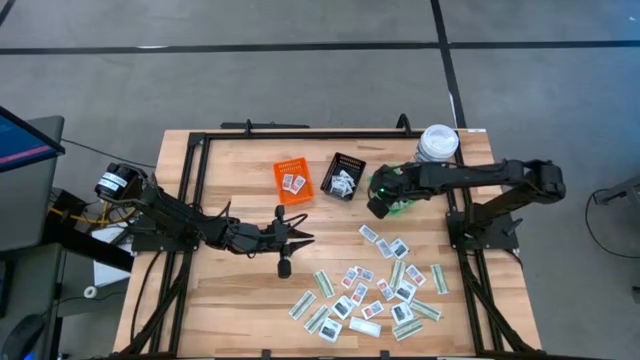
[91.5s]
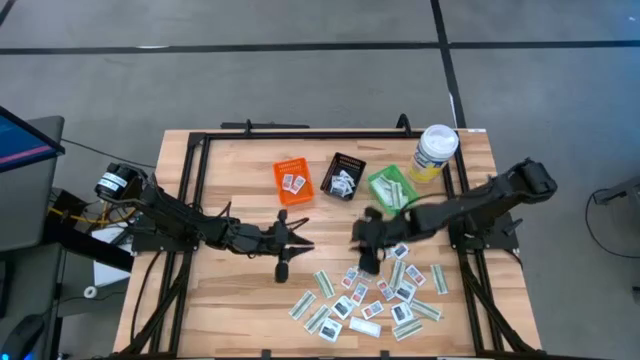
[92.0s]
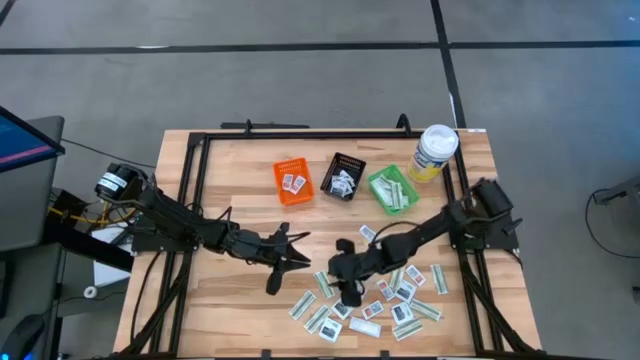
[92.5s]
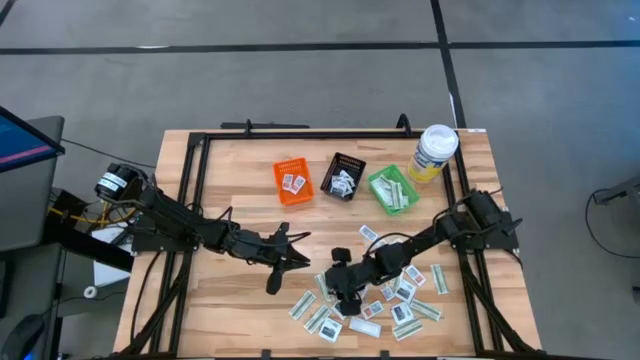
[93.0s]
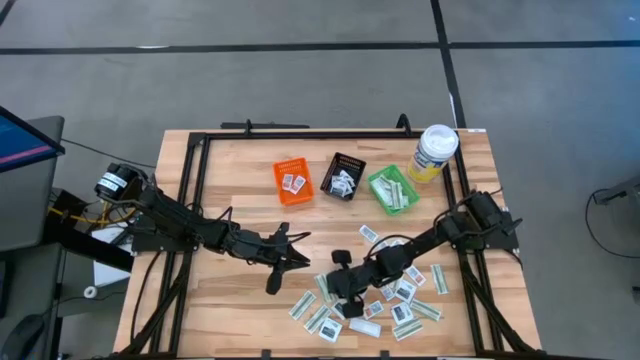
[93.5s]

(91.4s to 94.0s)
Task: Pick & Place First Aid Supplies
Put the green bandage pack into the green basket

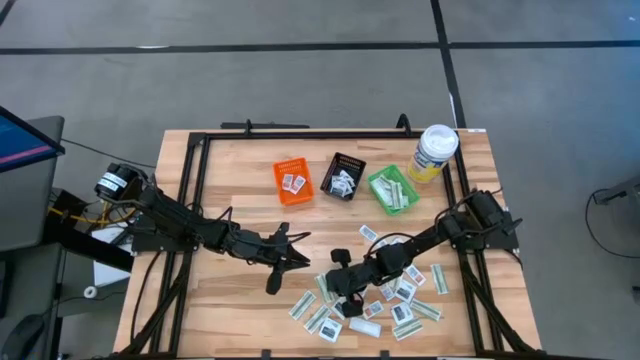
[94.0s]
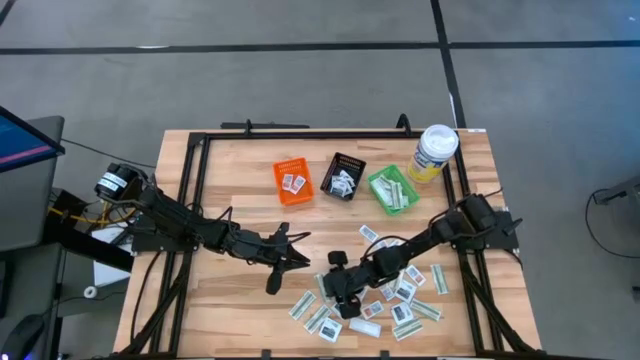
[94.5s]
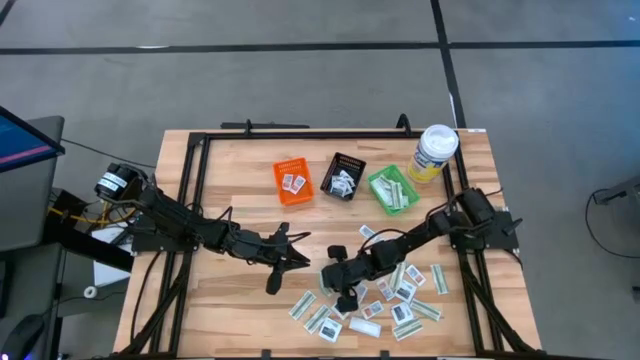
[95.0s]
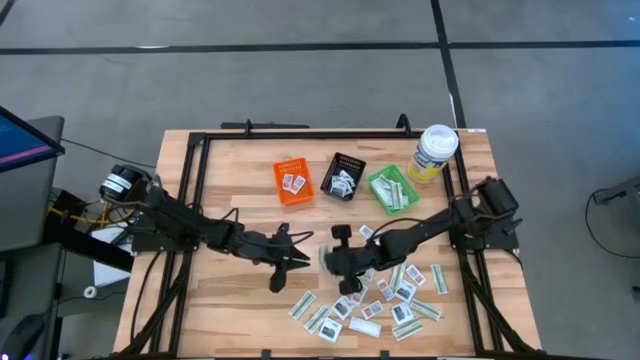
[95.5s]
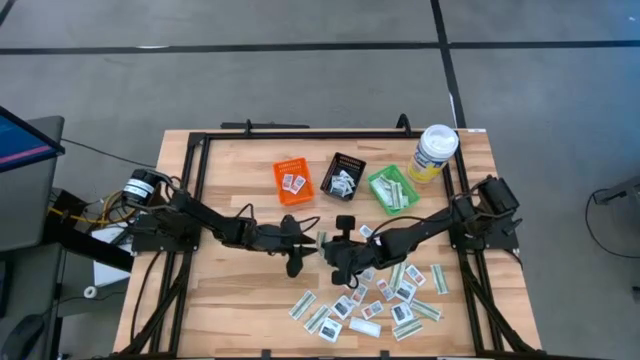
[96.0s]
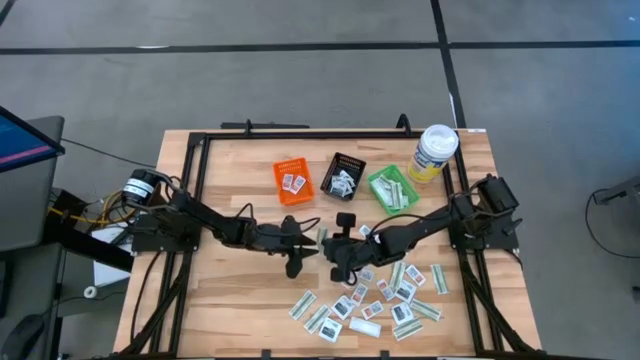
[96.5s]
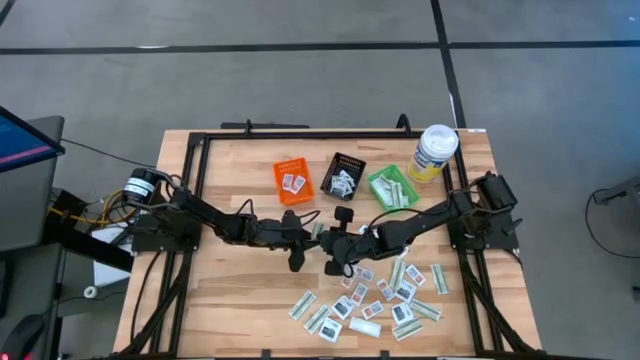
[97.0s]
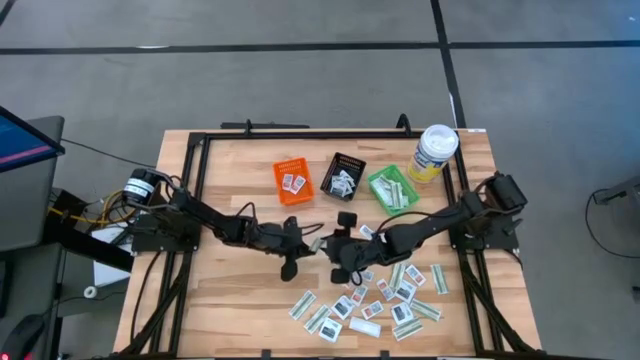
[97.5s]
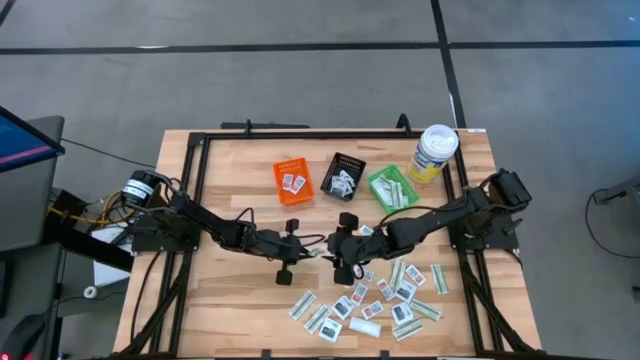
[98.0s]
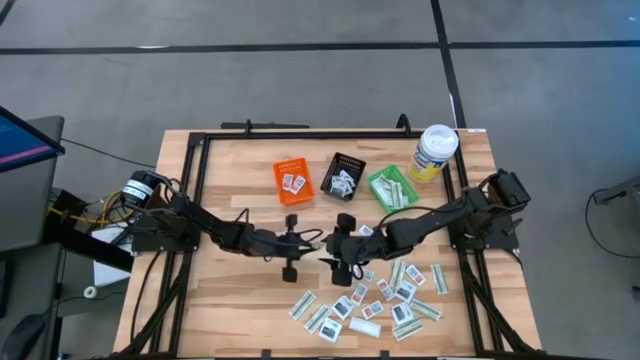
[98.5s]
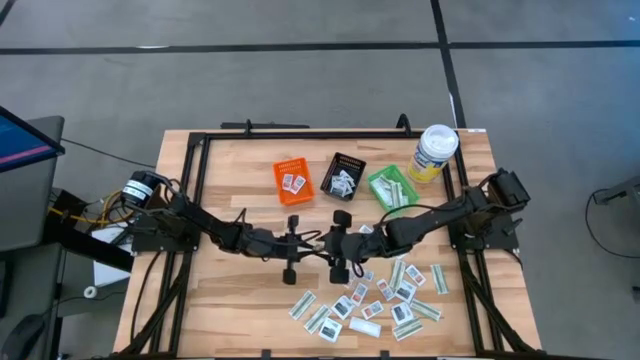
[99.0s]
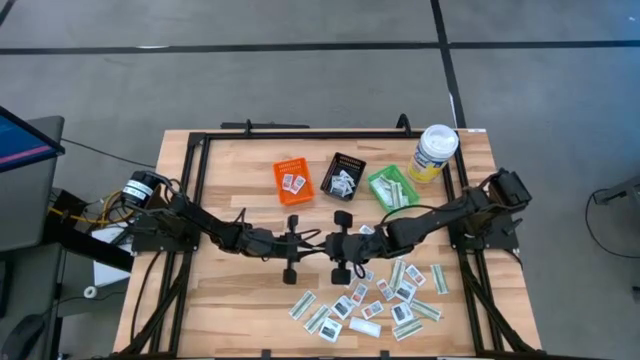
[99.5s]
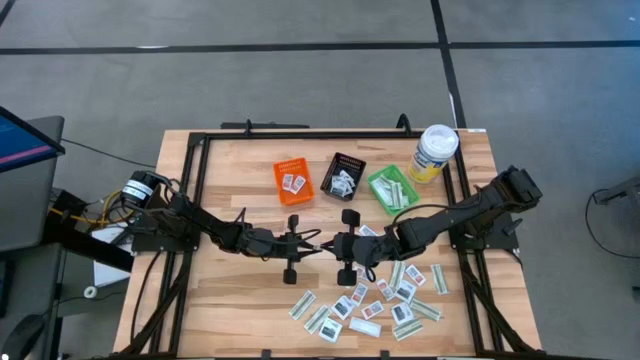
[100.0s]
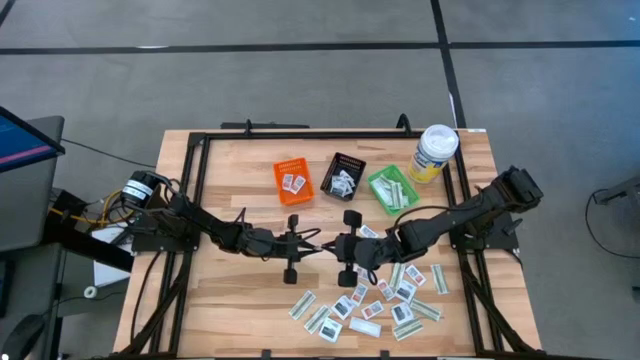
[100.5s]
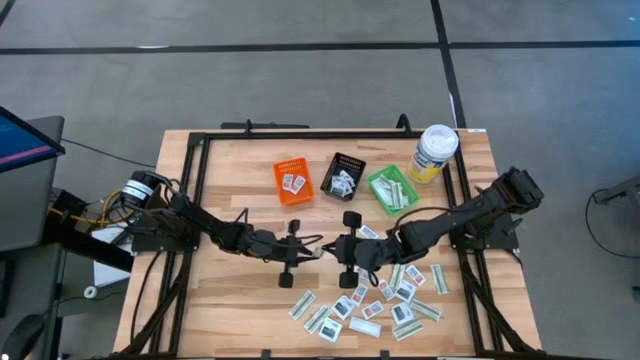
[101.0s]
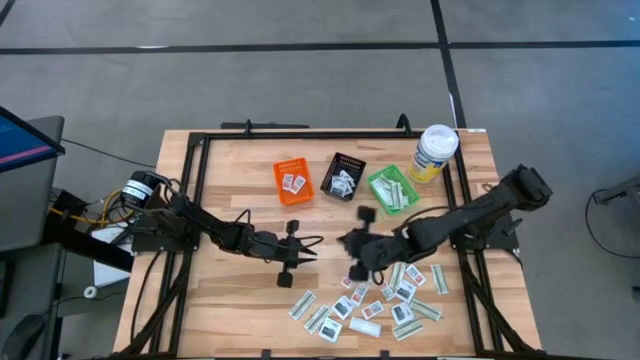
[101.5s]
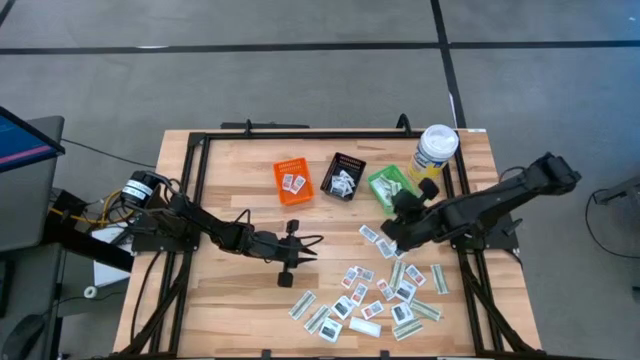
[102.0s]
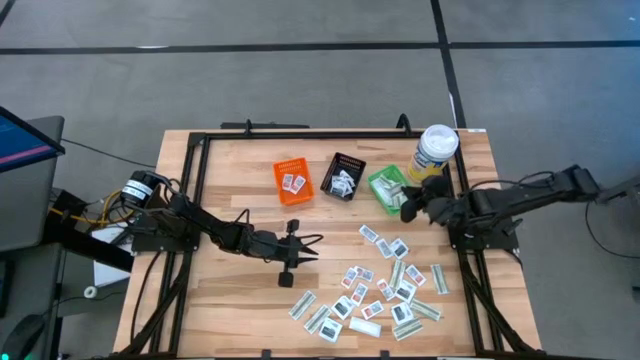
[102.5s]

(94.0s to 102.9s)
Put the green bandage pack into the green basket

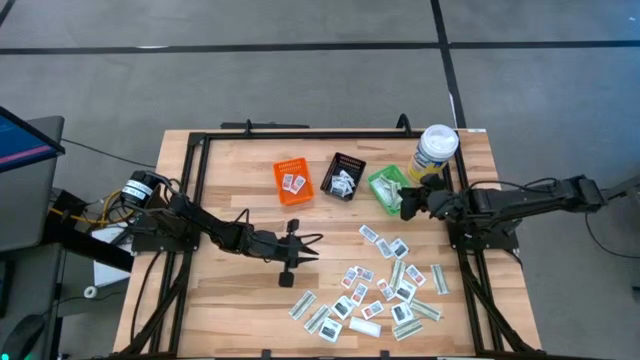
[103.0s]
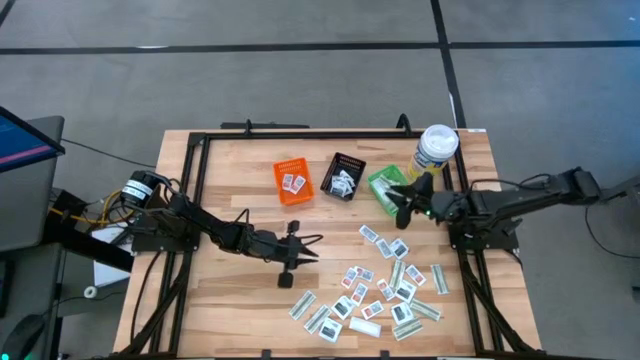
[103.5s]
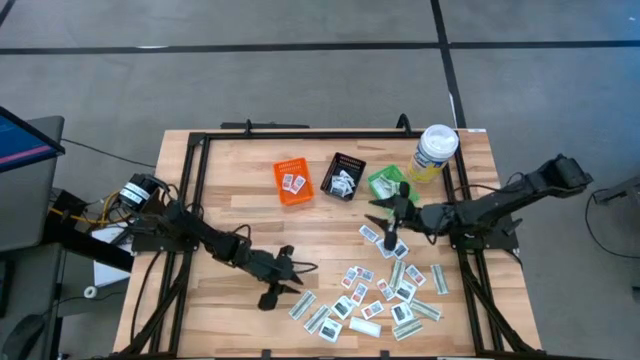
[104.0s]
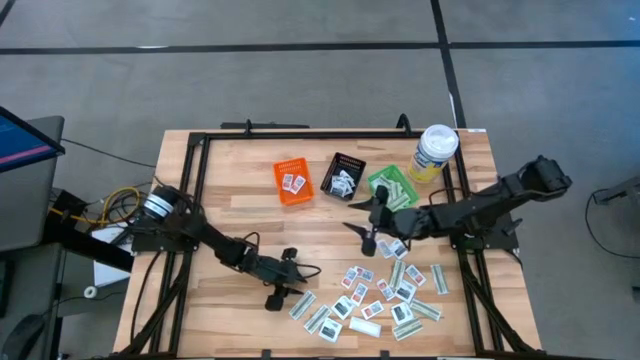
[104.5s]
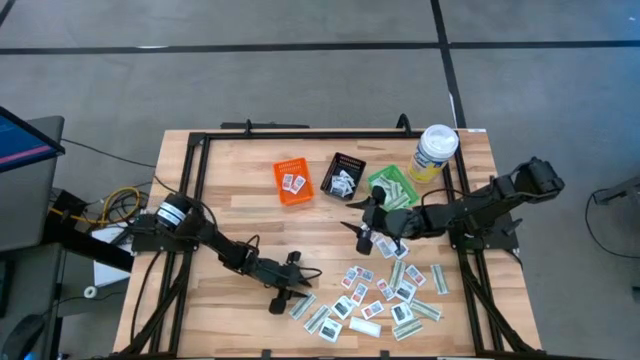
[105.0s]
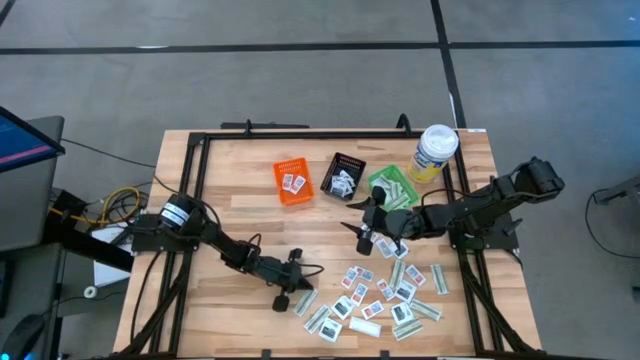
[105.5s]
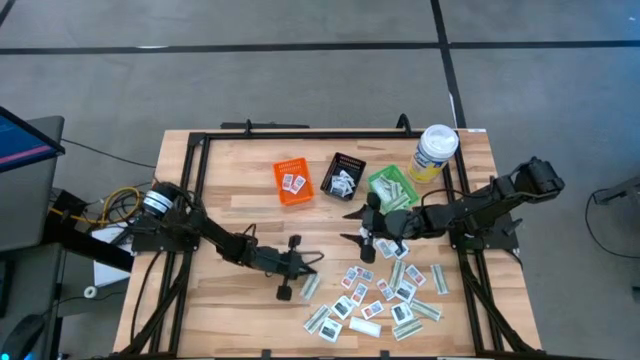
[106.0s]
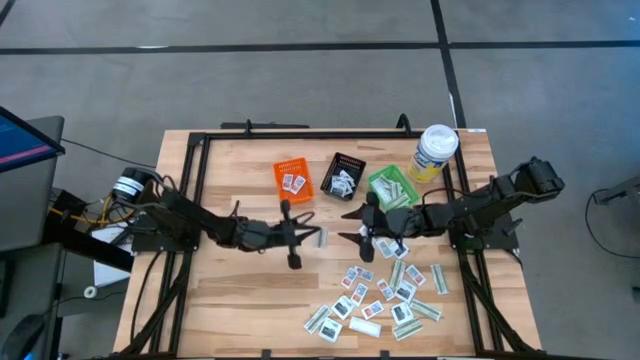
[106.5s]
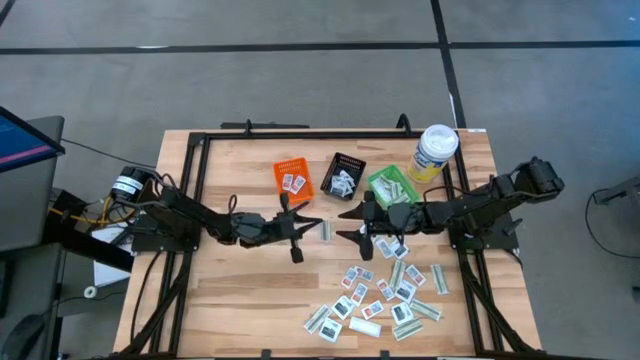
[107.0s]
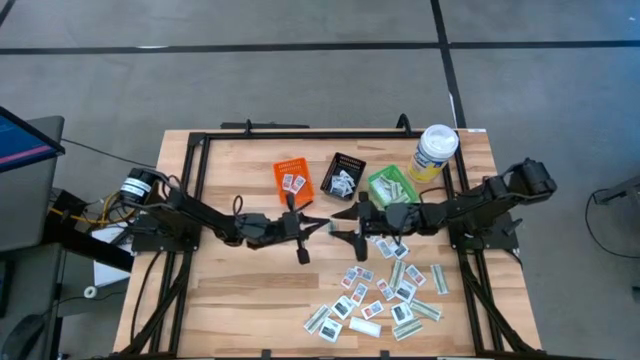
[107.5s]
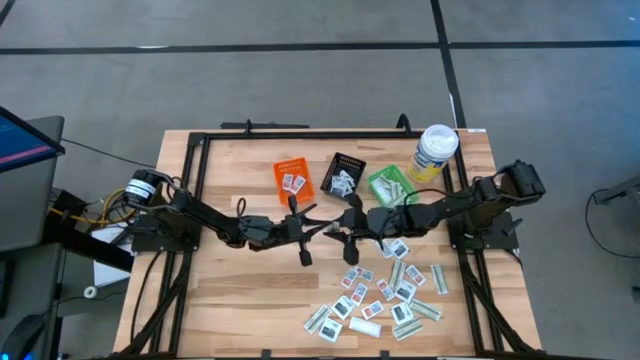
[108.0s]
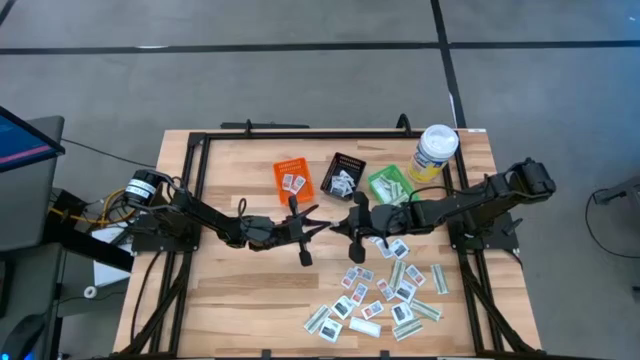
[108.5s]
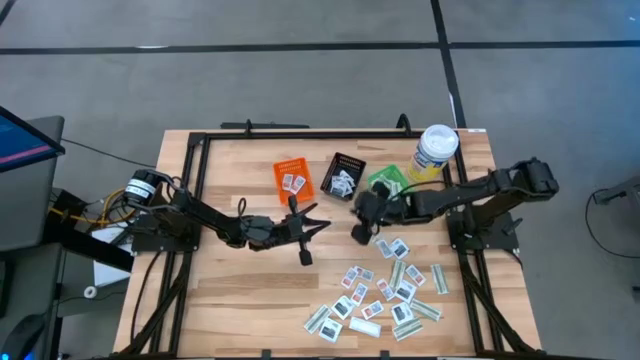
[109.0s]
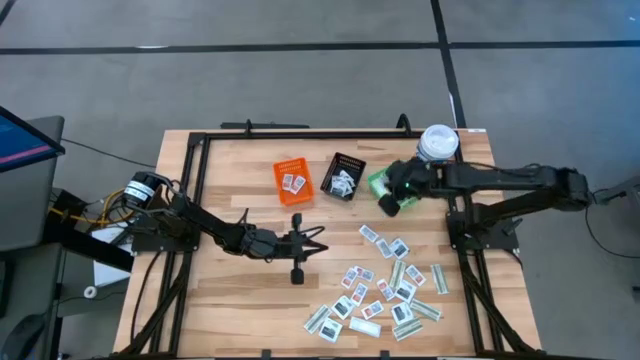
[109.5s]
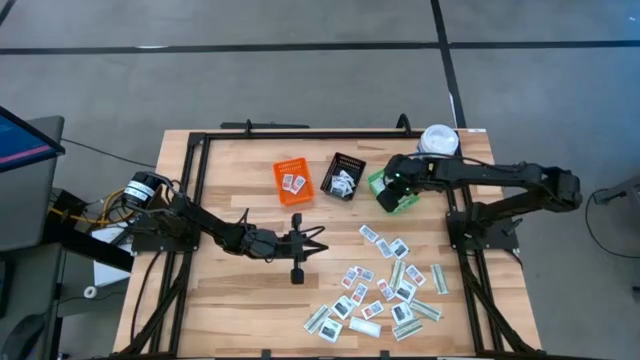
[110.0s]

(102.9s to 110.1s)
Put the green bandage pack into the green basket

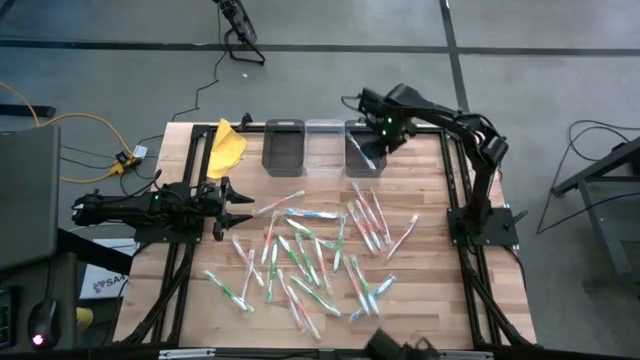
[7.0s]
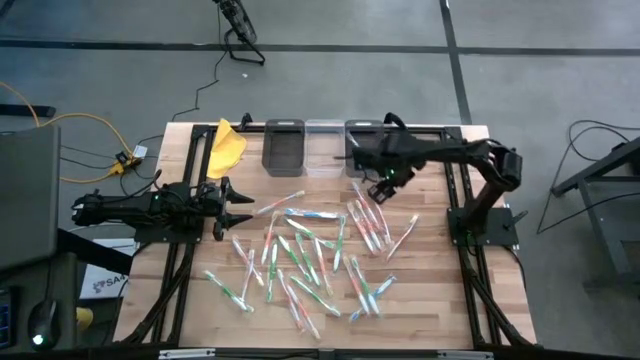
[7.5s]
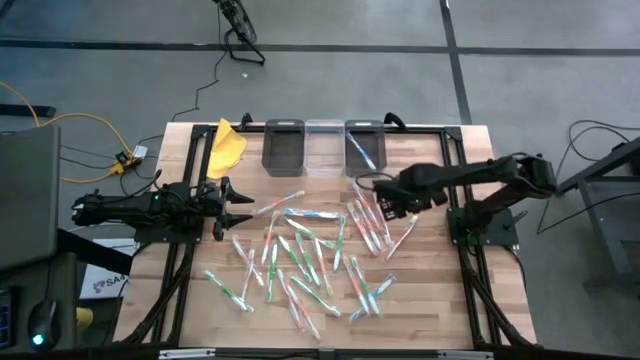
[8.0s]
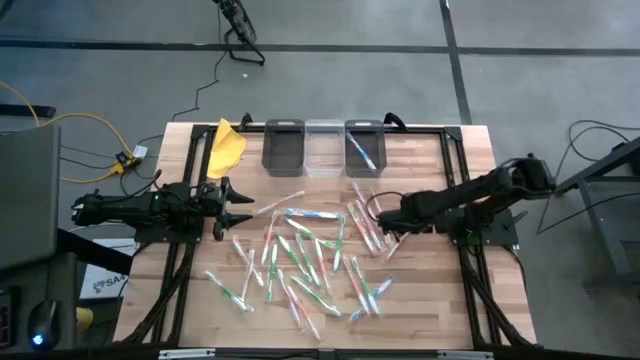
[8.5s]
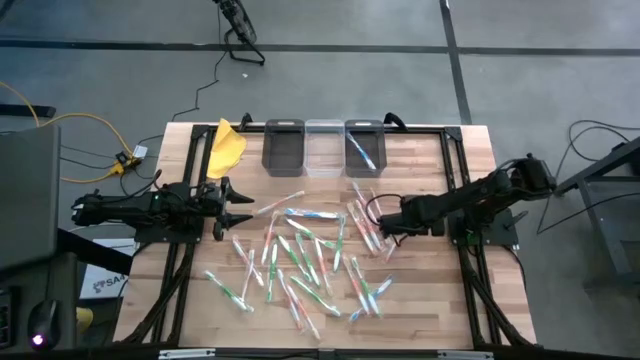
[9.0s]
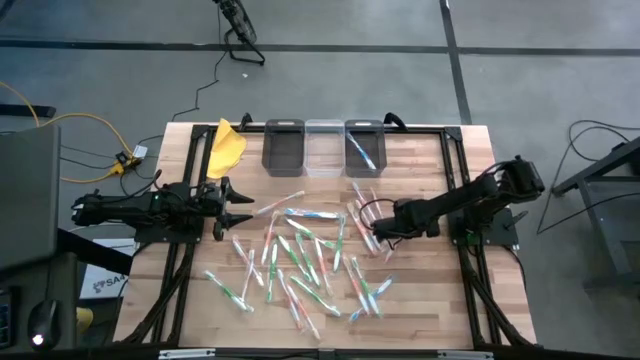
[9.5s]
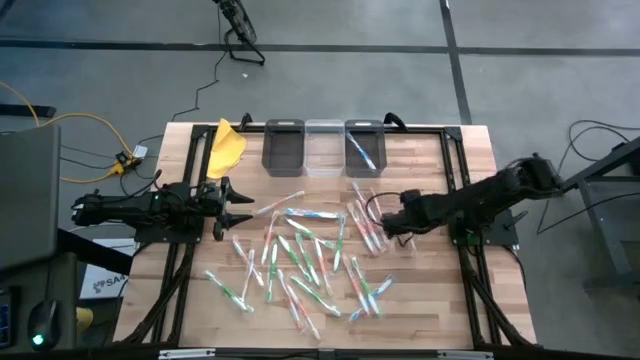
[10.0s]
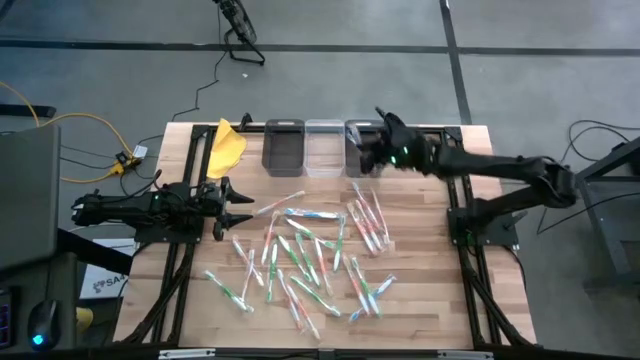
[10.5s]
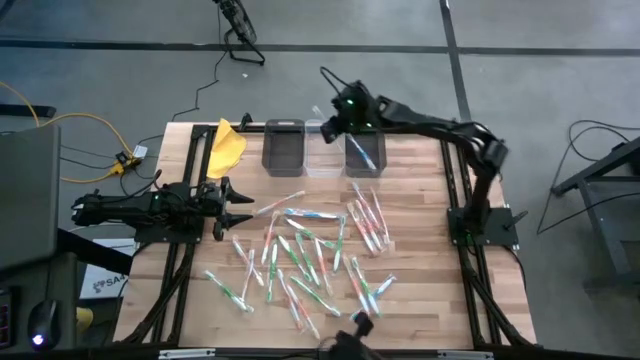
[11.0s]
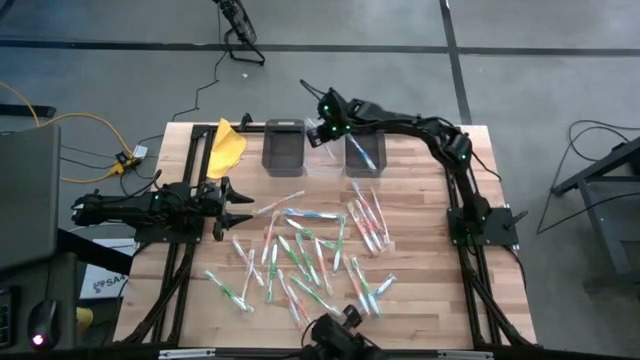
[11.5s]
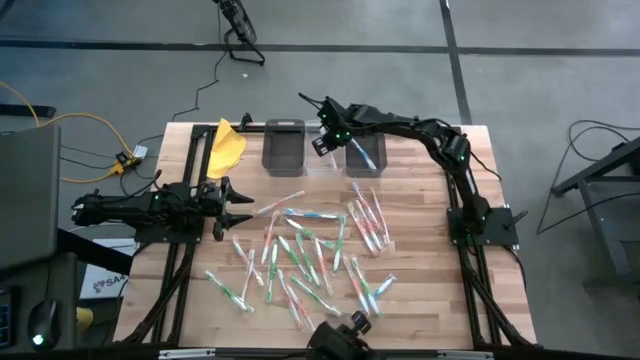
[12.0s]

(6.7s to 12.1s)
Task: Pick & Place Toothbrushes
Put the orange toothbrush into the transparent bin
